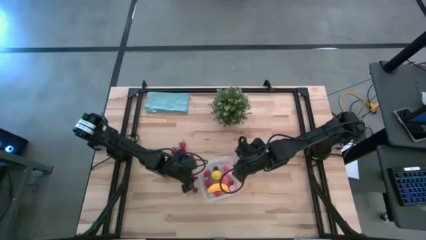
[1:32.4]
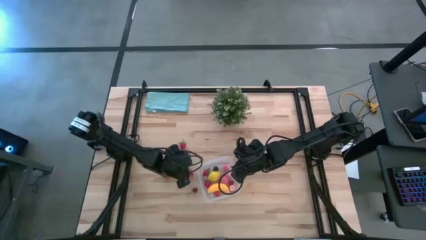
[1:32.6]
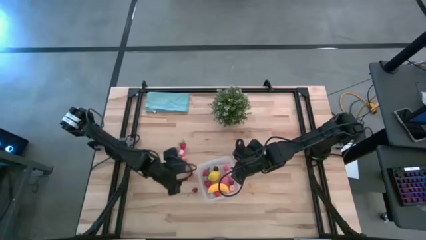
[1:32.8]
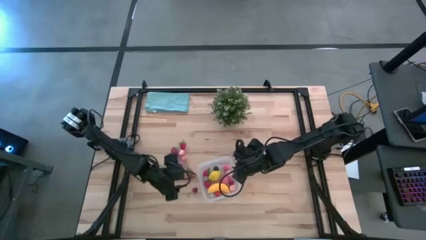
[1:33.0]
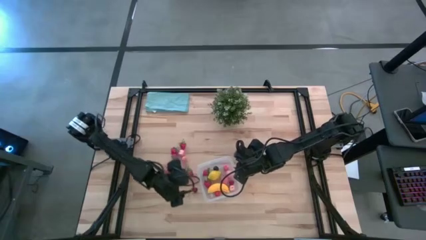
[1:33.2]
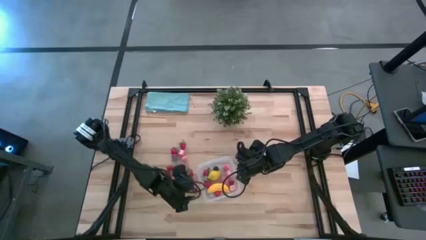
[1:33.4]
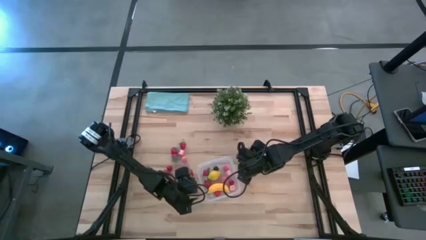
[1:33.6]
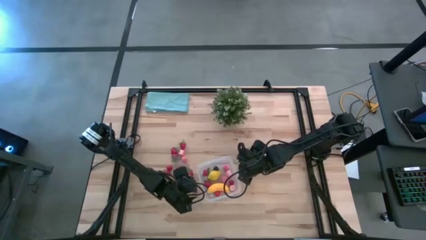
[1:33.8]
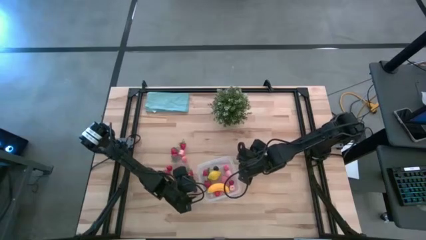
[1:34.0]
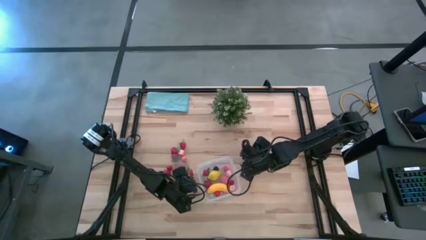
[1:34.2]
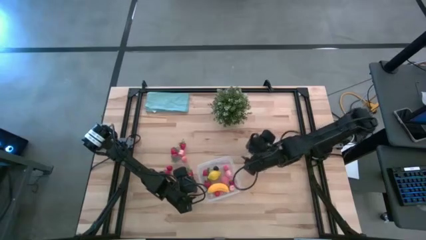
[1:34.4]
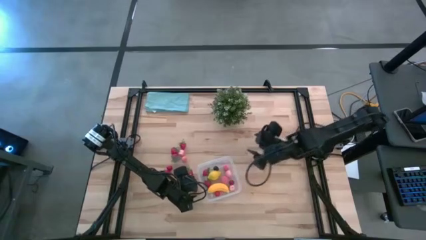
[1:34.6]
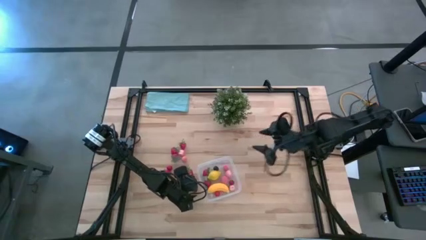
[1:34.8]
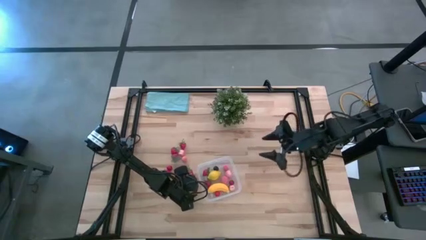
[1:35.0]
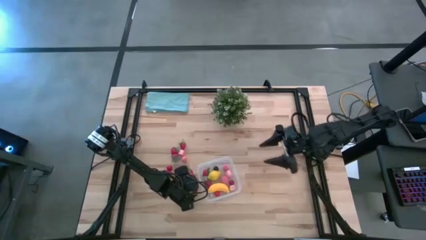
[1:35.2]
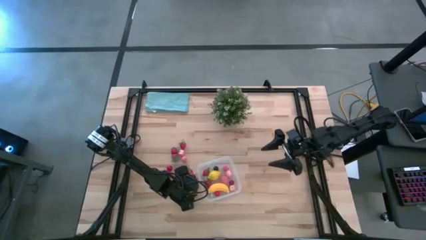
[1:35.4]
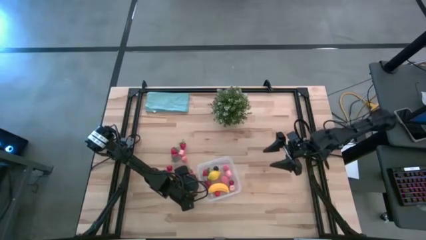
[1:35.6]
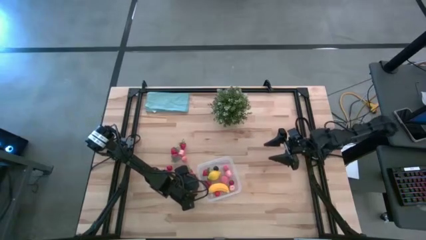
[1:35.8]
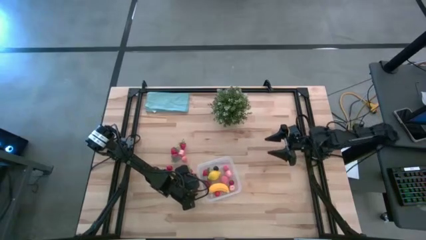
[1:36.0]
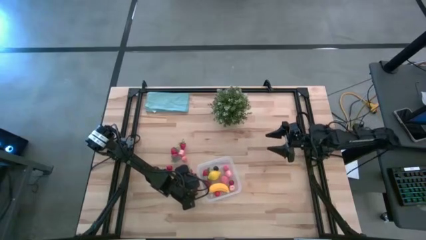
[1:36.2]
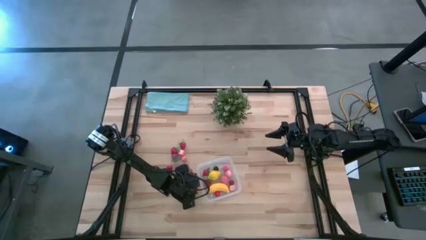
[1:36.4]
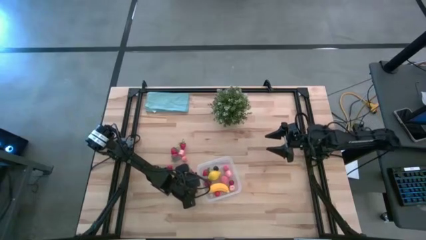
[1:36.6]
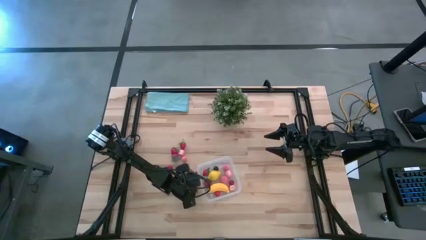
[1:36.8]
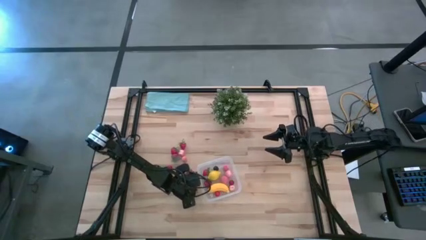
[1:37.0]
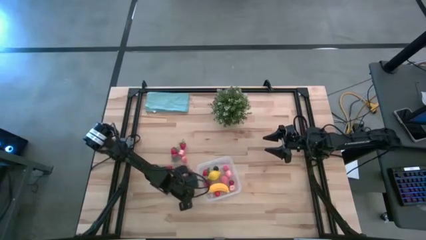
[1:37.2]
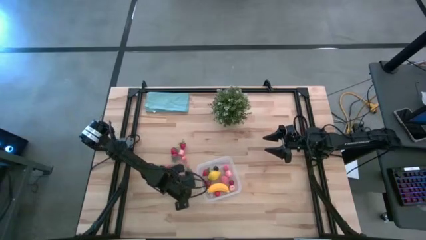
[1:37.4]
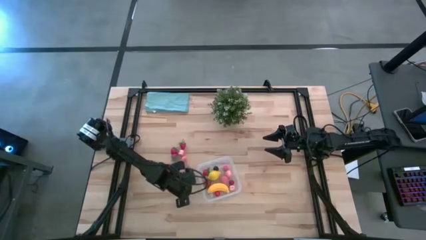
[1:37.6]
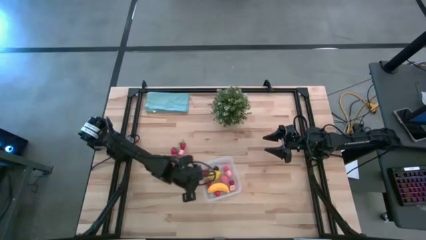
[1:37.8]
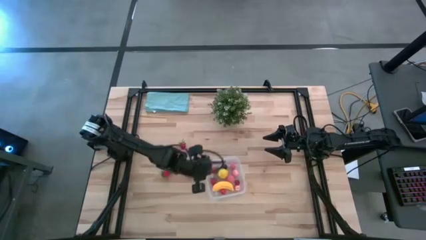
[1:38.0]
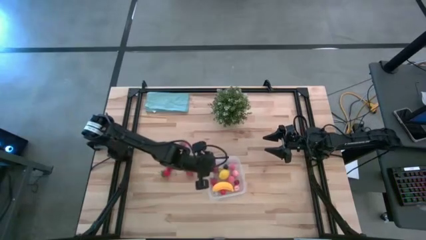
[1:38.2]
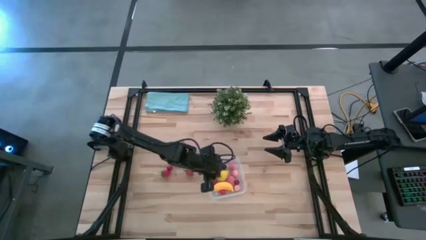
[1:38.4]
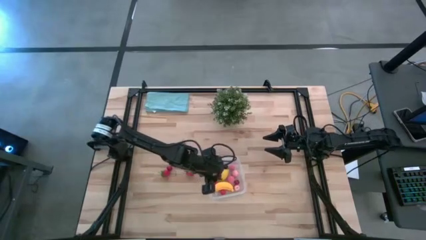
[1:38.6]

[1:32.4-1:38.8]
Task: Pick and placing Produce into tupperware
Put the red cherry into the transparent bin

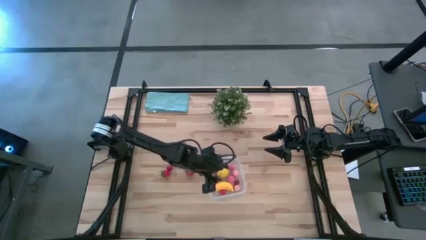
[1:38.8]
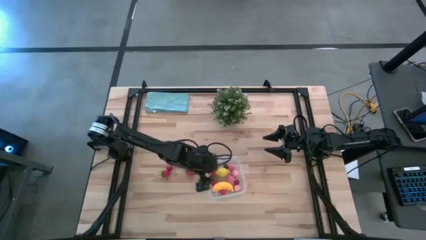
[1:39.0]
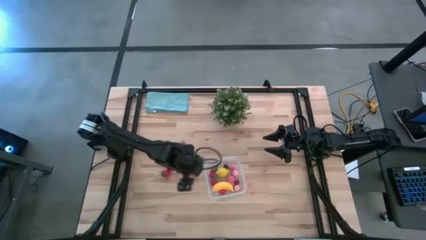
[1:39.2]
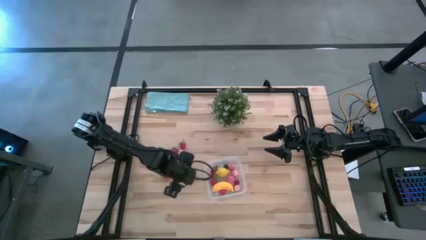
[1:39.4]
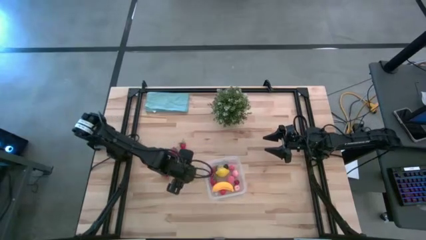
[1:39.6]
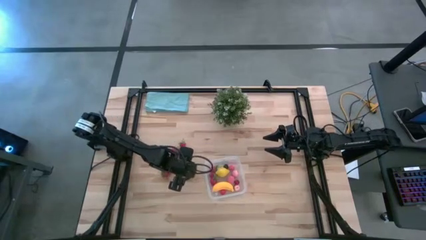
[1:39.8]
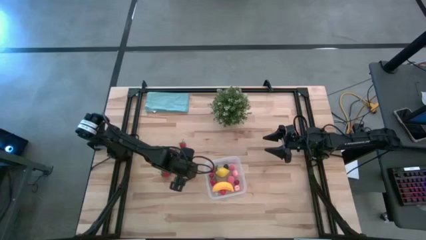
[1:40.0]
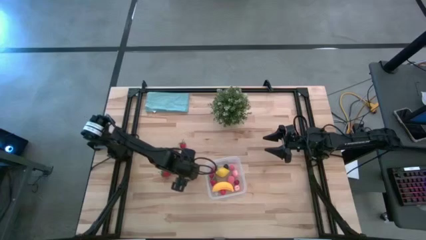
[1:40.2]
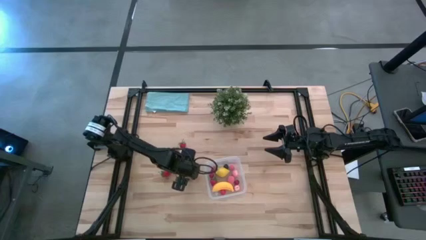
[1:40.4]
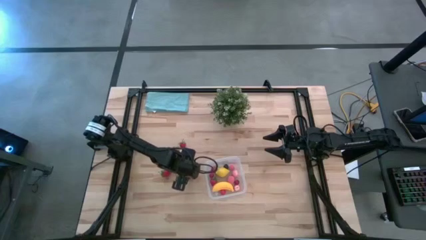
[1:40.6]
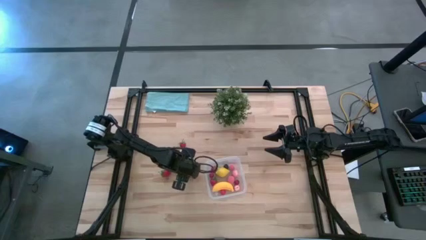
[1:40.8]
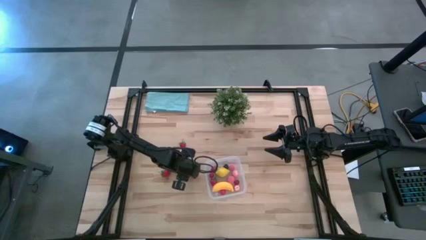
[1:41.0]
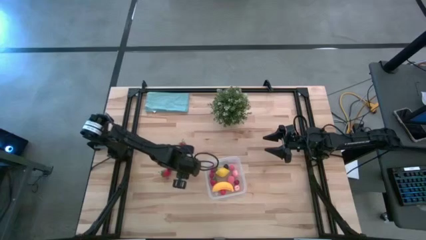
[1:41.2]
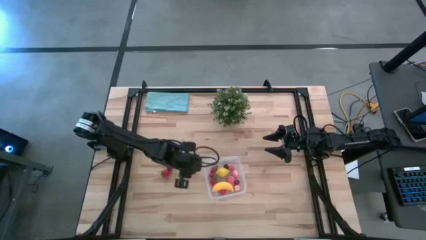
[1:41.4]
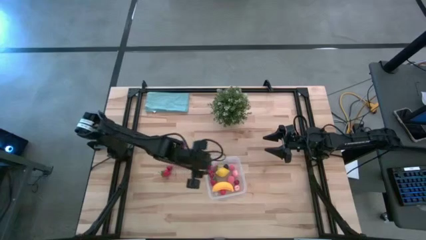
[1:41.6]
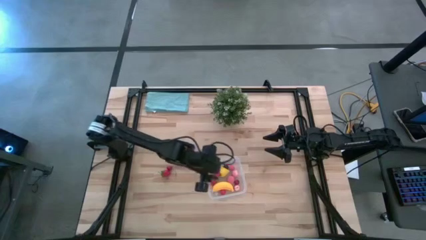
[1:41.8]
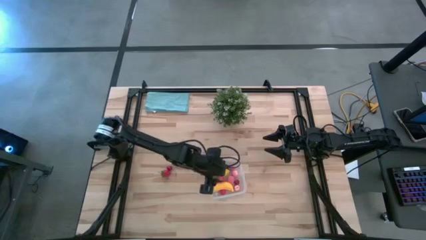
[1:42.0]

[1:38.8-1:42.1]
Put the red strawberry into the transparent bin

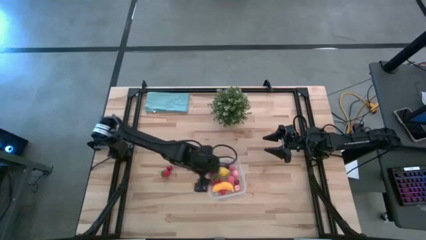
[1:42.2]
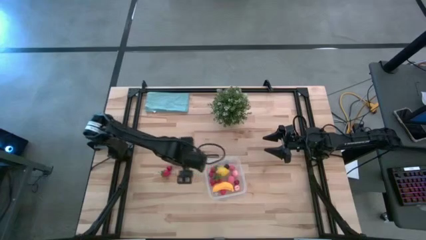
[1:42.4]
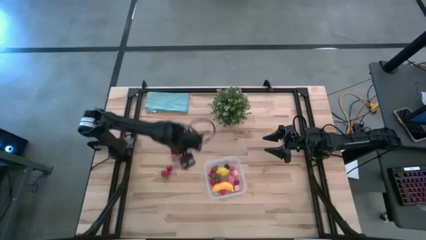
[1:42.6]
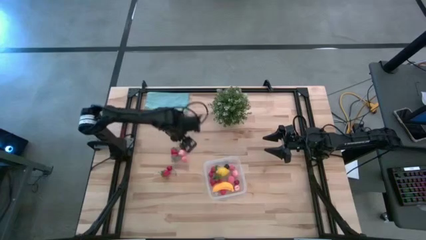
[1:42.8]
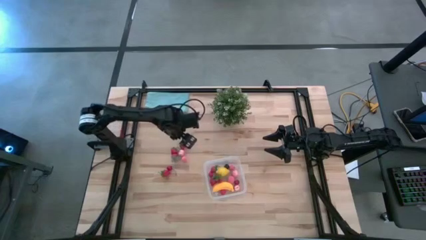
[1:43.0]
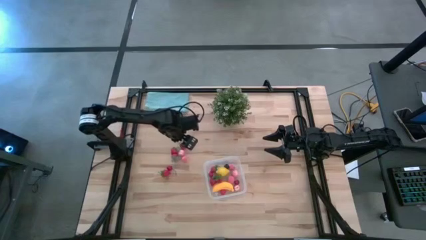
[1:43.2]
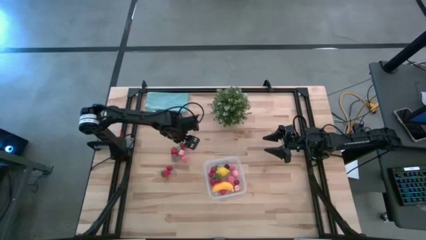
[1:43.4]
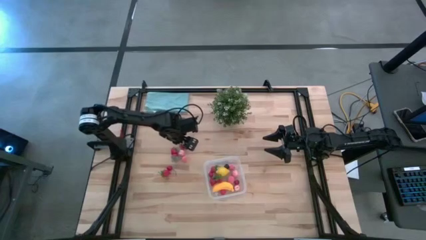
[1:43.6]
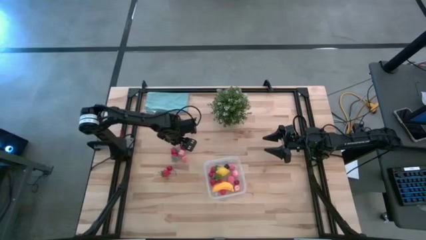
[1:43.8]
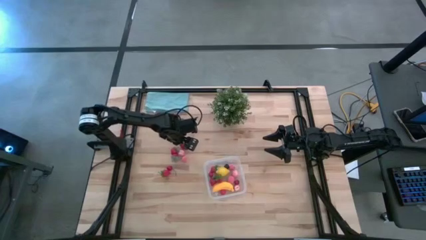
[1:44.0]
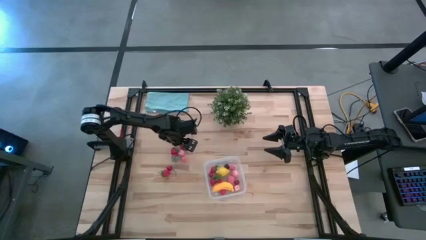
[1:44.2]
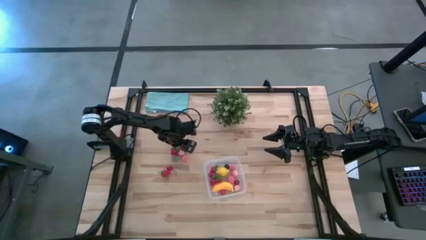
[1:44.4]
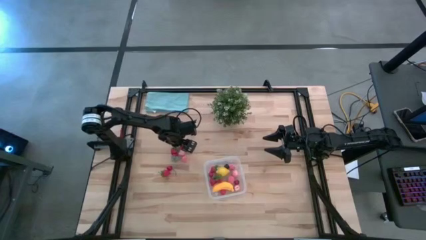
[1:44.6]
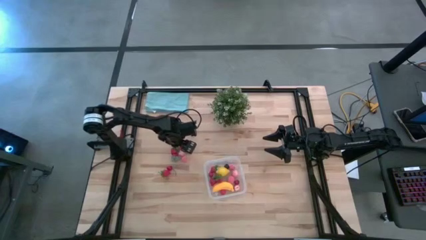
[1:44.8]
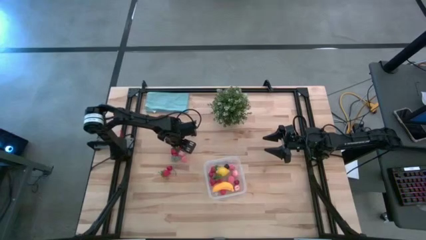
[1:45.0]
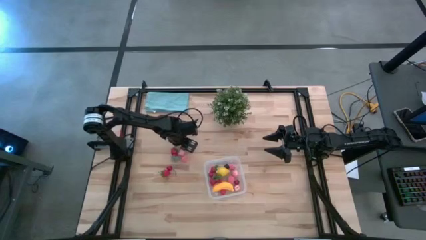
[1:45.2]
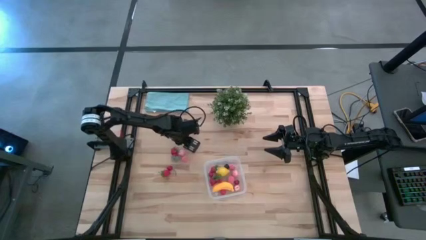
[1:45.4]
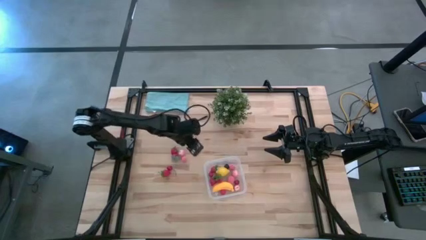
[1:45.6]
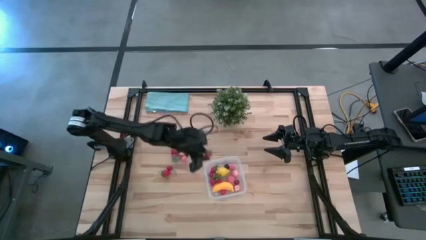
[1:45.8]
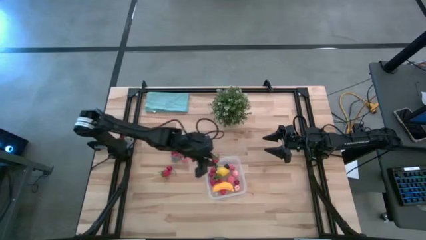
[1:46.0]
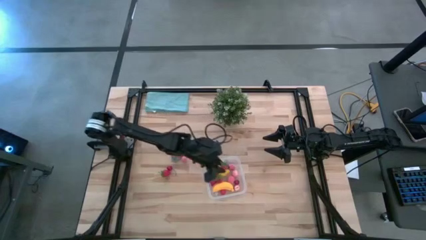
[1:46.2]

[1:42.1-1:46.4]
Put the red strawberry into the transparent bin

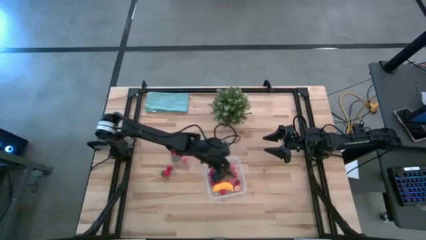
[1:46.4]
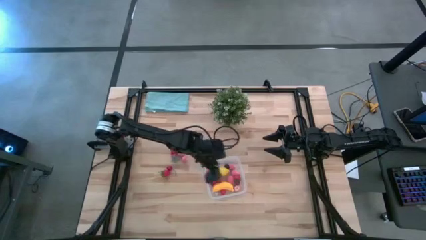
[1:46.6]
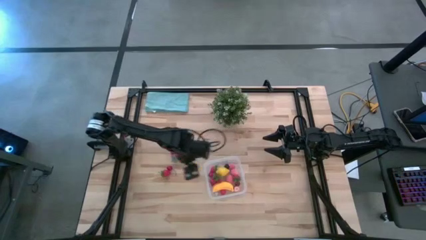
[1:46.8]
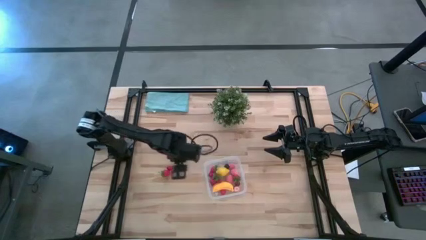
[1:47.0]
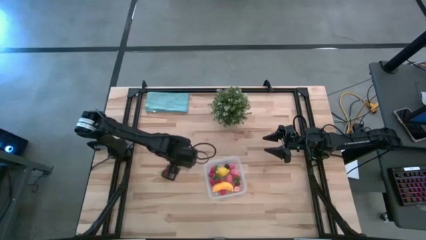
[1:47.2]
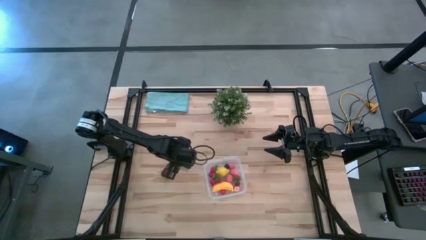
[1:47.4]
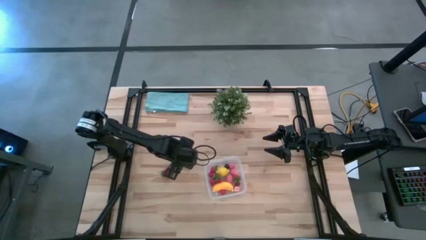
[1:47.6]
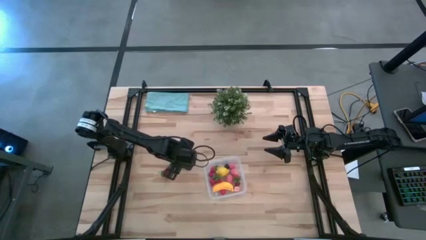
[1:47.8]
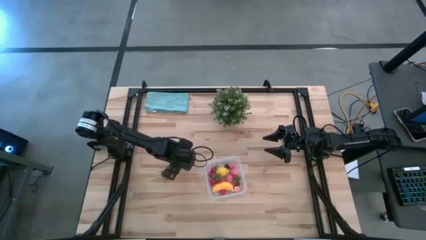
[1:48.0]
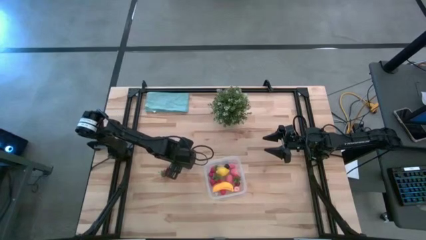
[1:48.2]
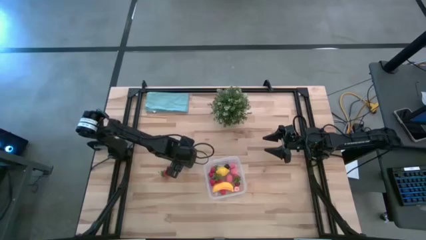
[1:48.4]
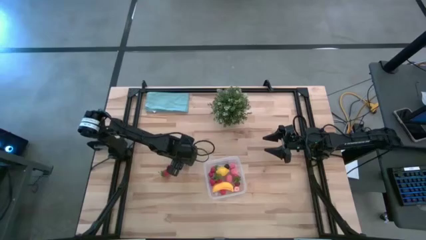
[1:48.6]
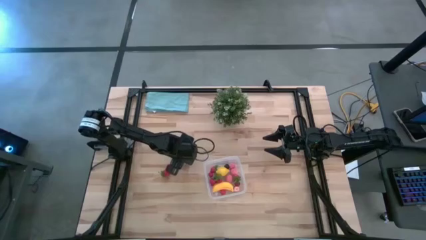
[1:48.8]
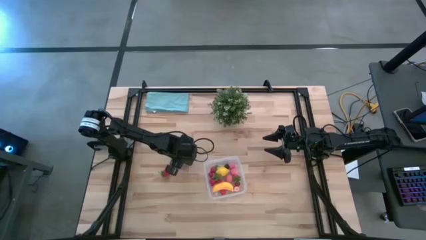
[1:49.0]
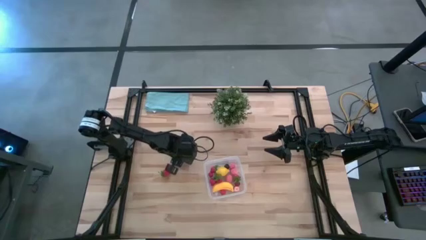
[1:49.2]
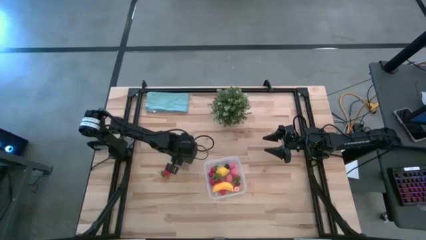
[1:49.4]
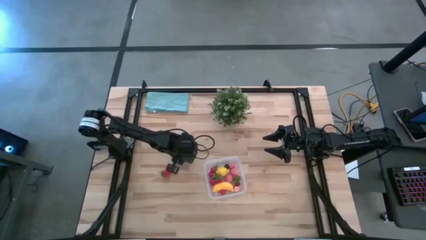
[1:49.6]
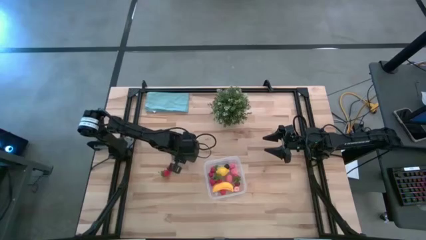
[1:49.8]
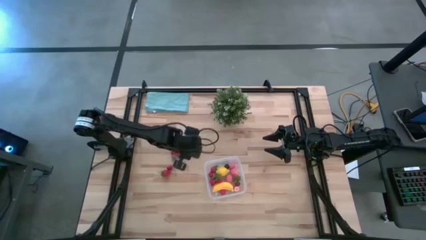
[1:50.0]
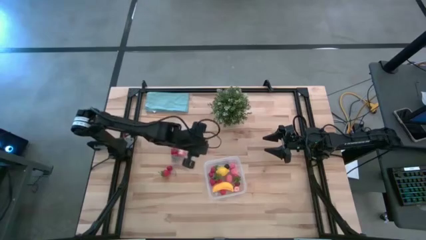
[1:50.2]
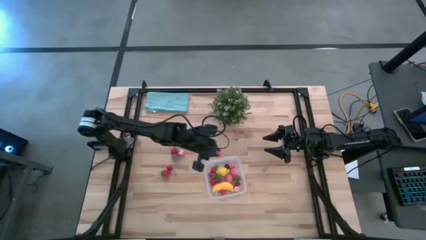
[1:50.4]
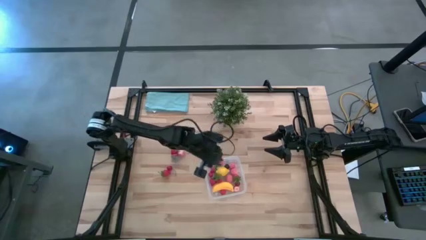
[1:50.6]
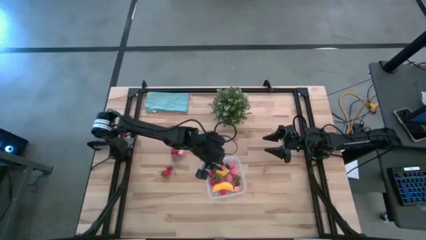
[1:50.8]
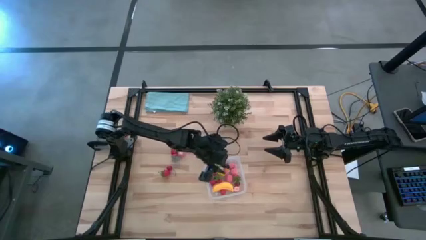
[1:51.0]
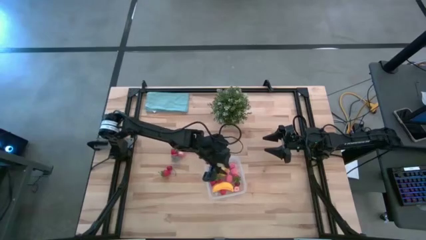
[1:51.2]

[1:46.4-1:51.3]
Put the pink peach into the transparent bin
